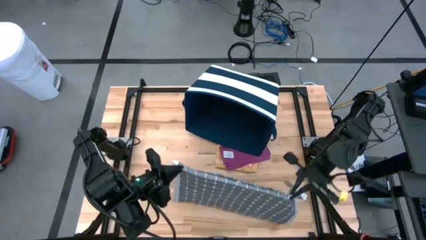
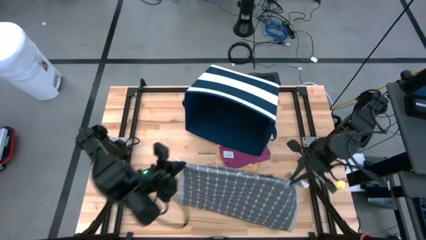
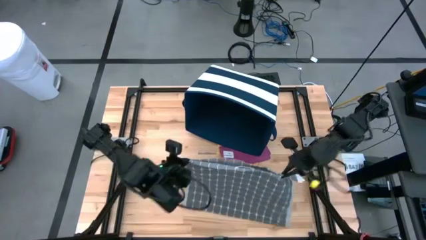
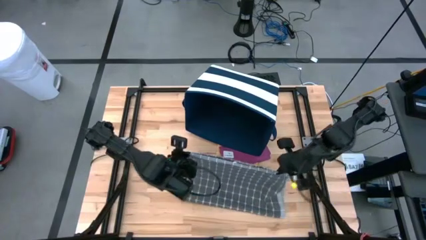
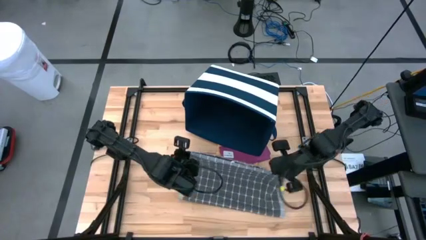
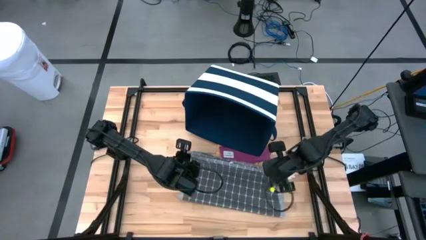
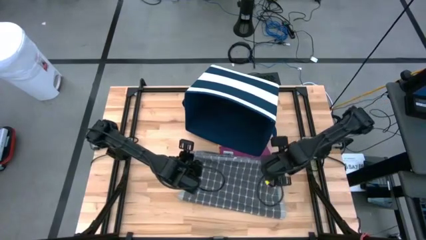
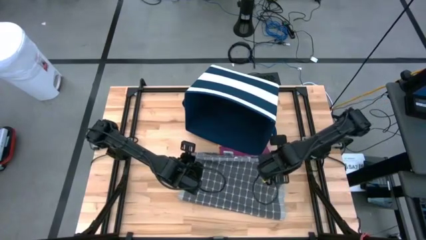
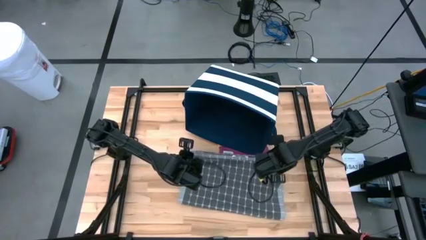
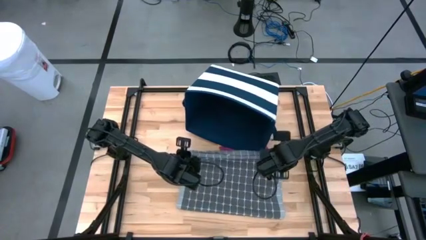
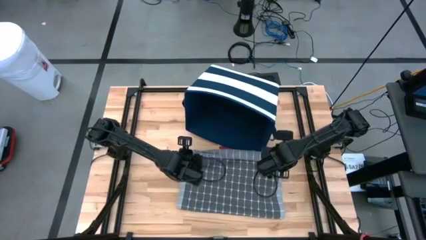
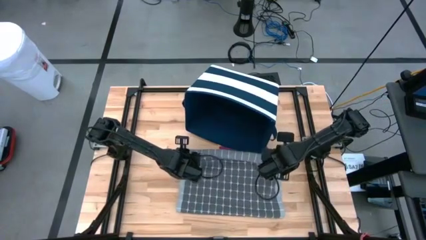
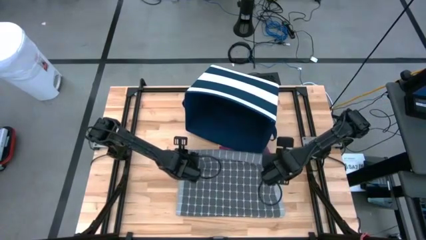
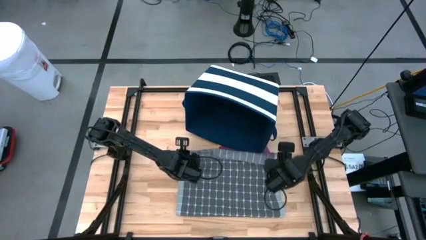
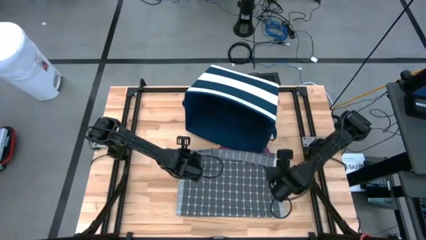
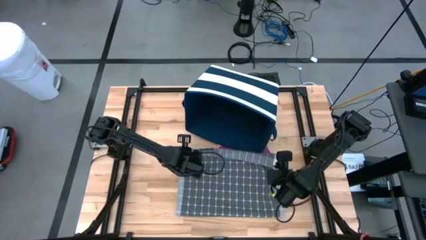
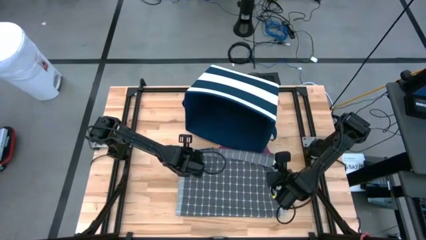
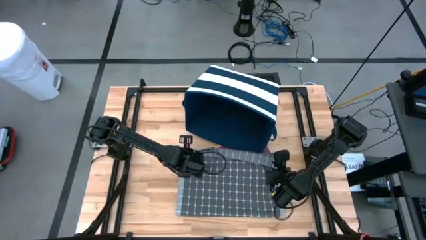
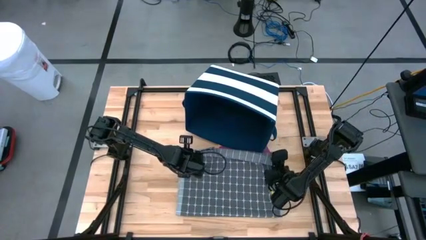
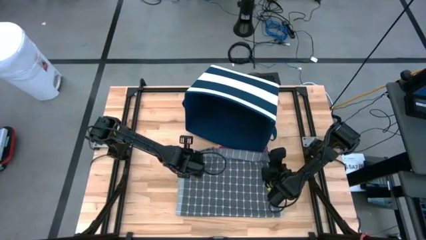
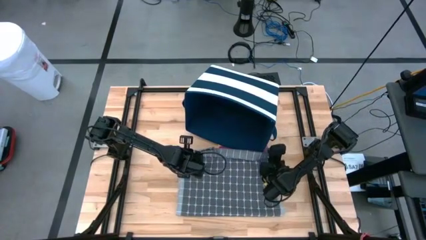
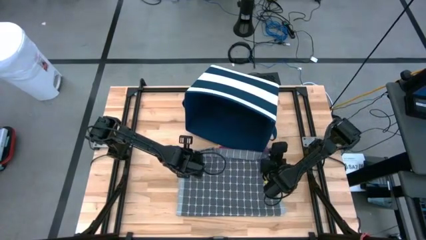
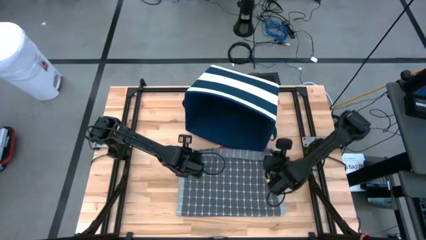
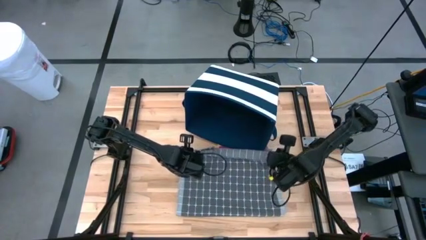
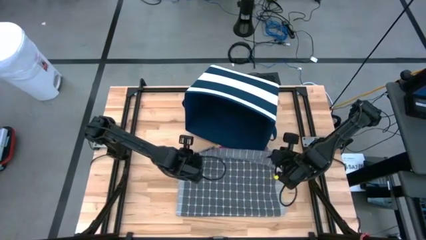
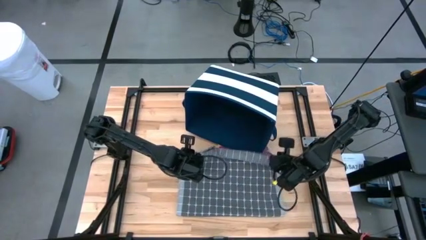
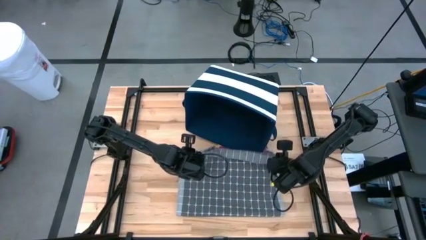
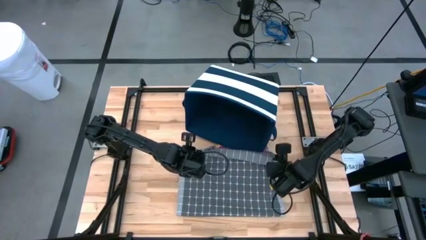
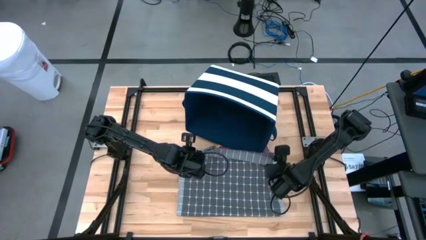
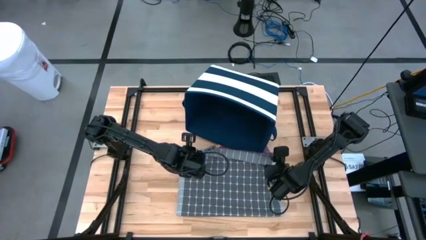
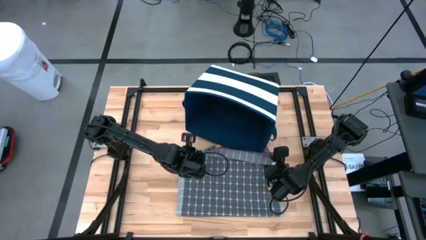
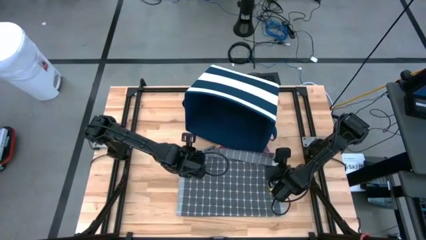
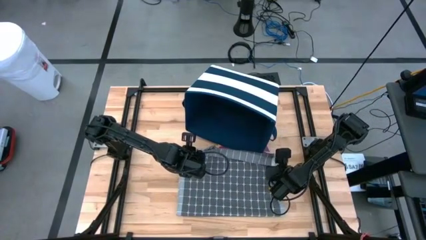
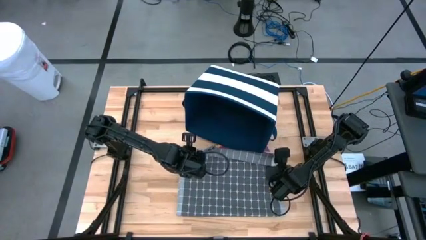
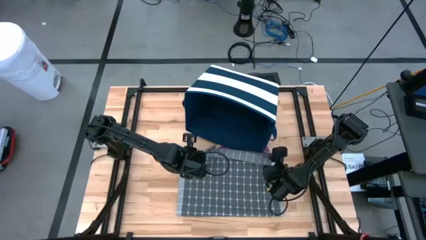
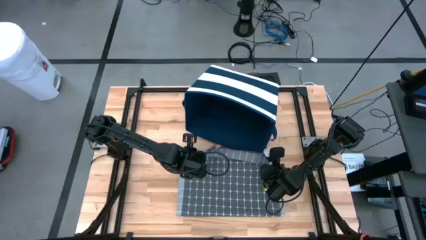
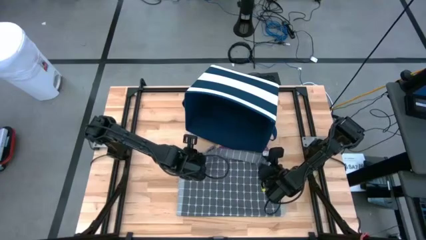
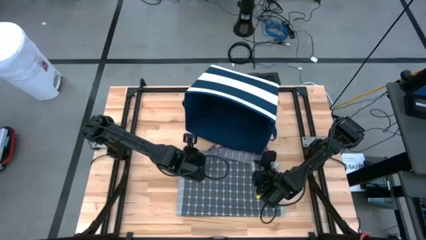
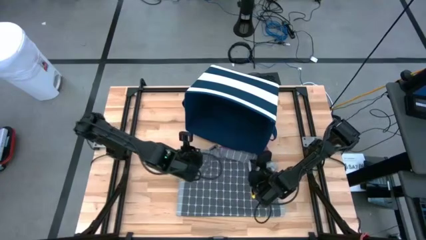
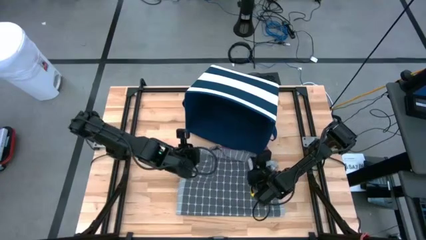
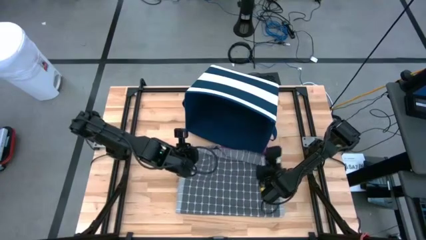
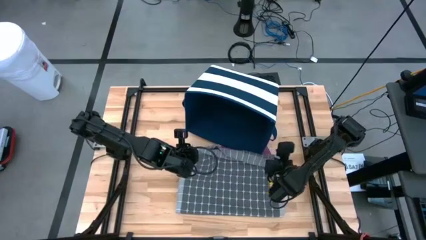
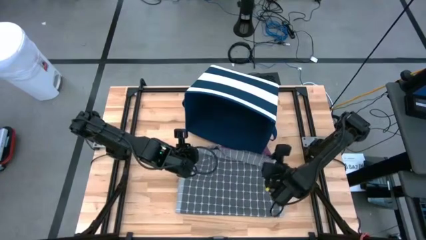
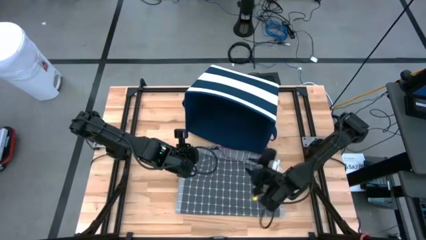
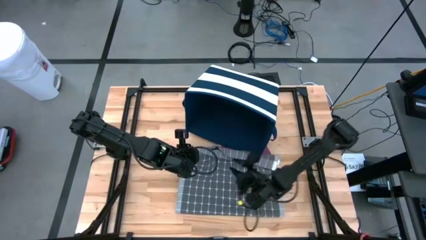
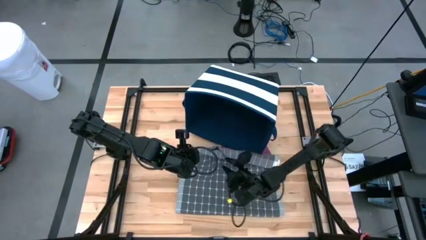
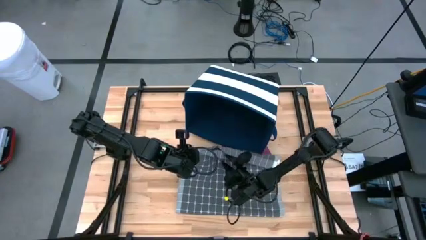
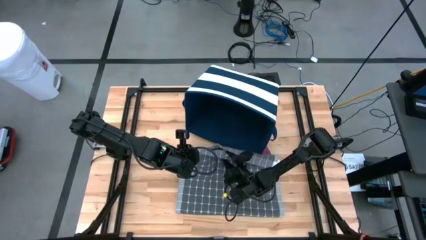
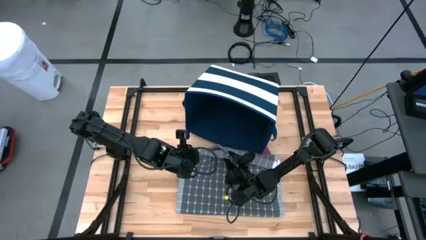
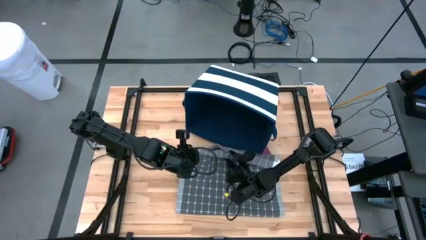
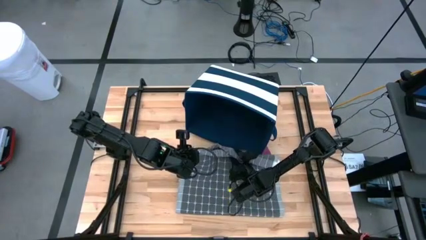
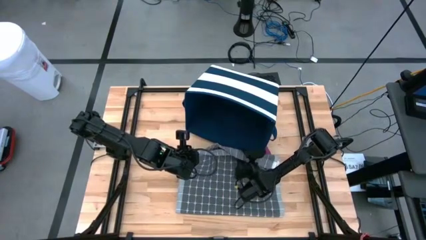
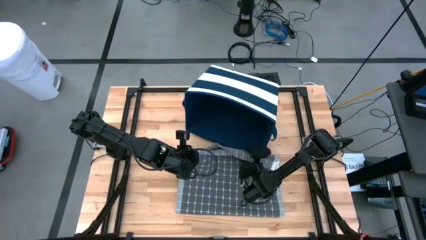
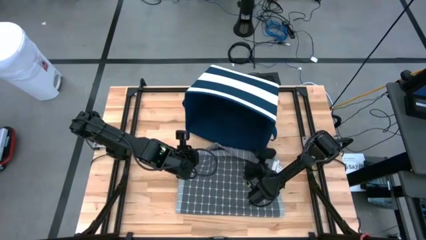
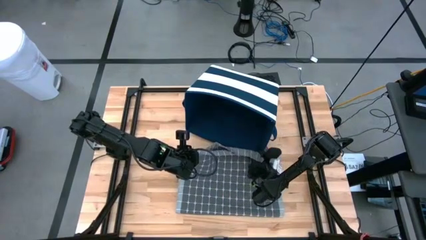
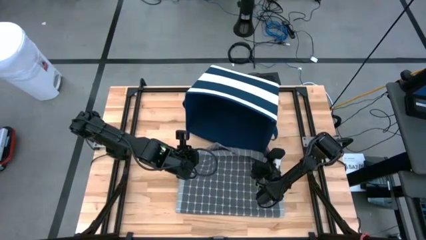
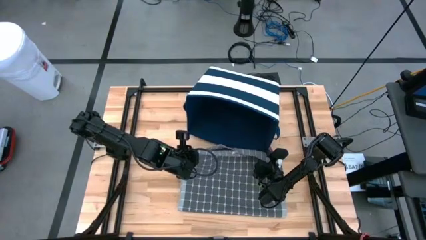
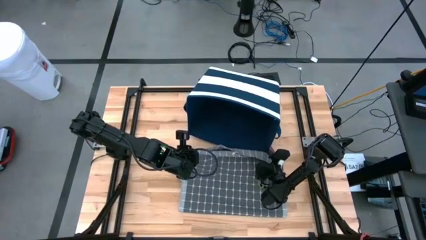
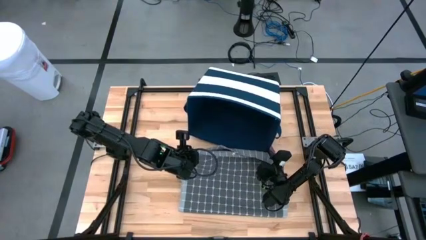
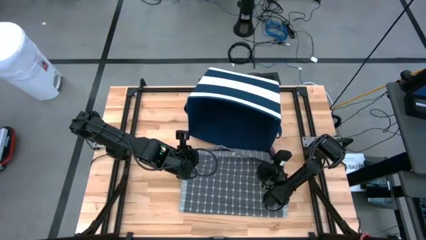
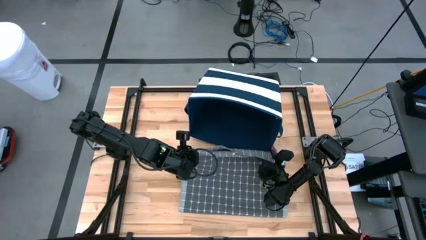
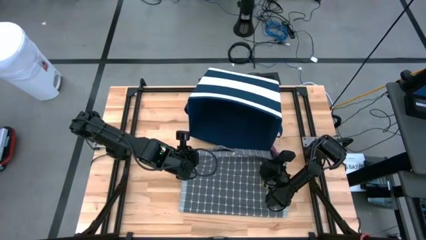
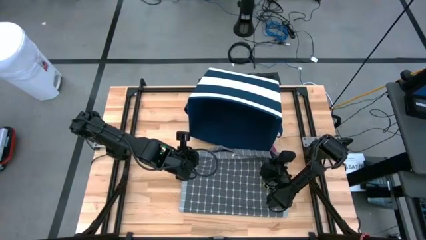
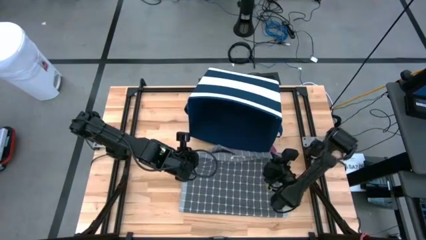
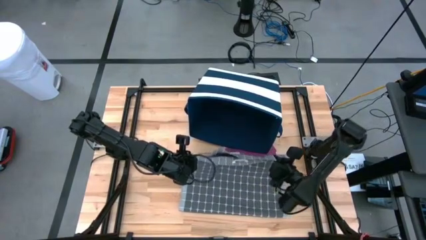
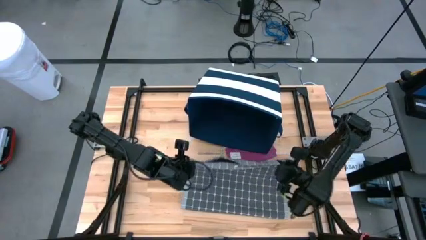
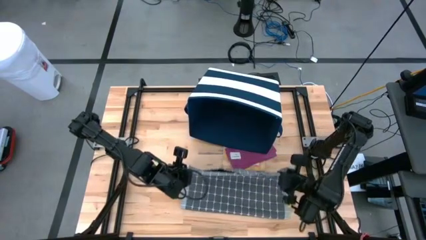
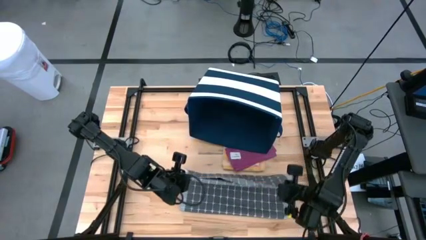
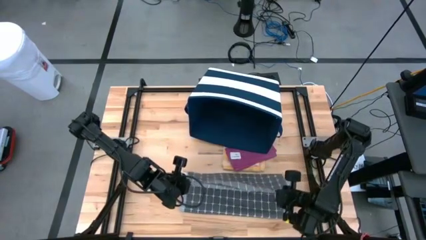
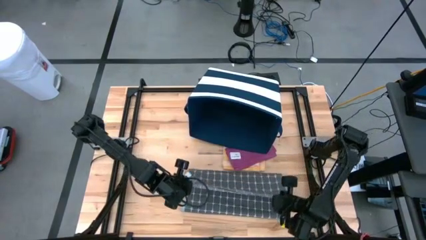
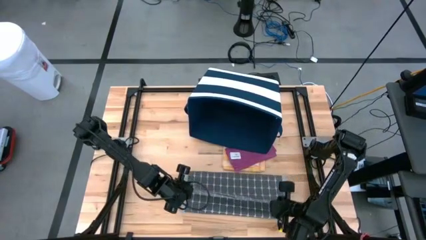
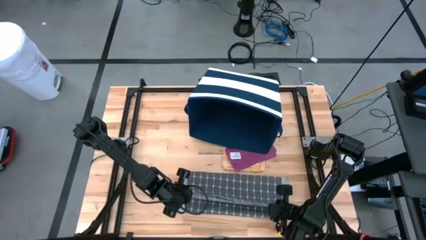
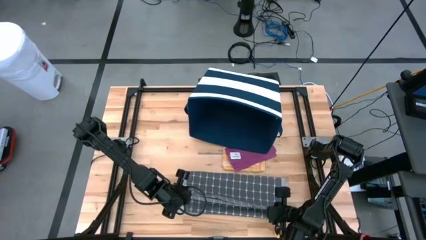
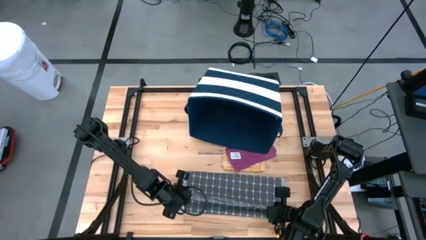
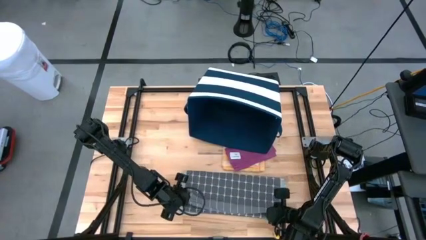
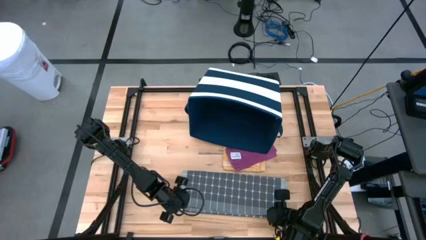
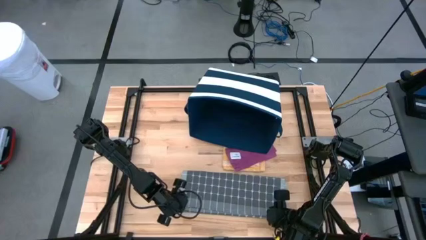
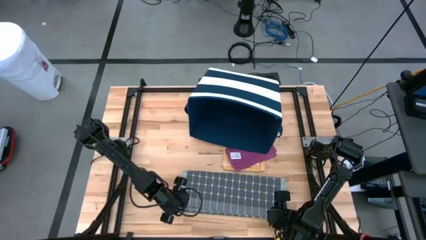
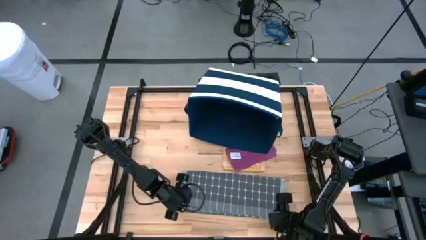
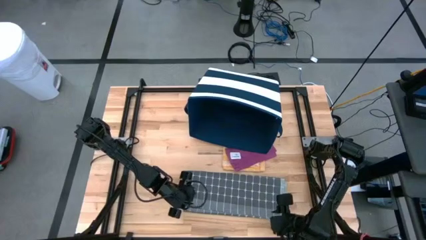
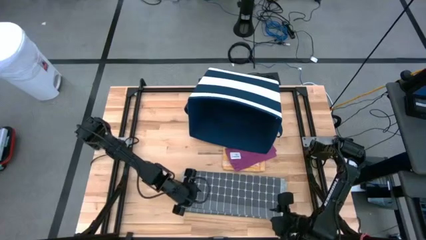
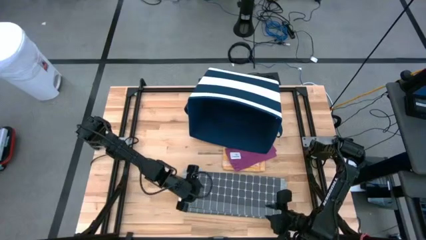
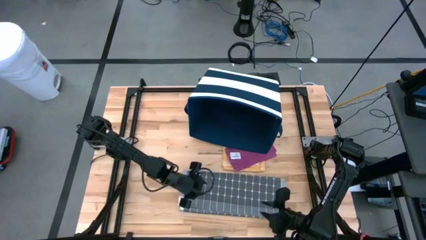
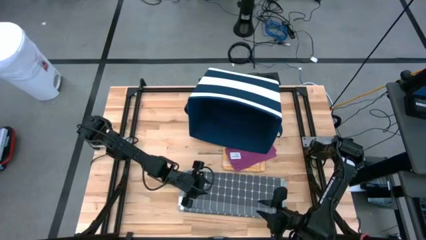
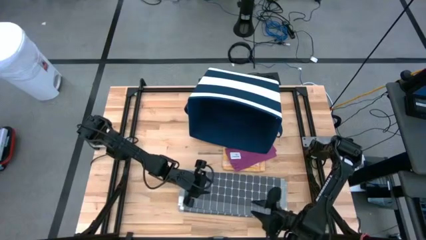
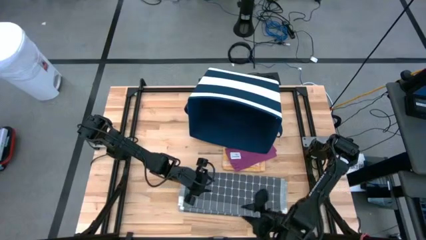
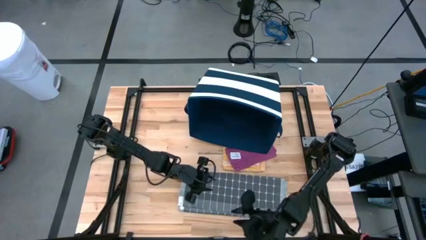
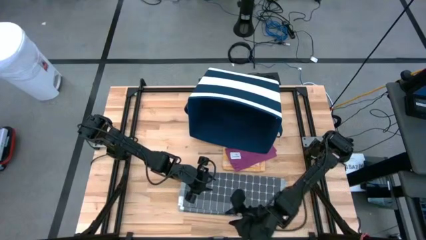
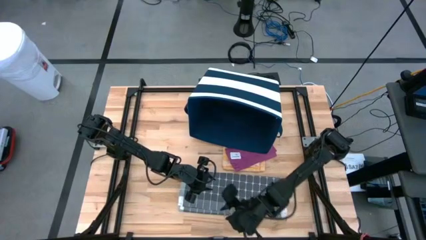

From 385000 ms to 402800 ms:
Task: Fold towel
Fold the gray towel
